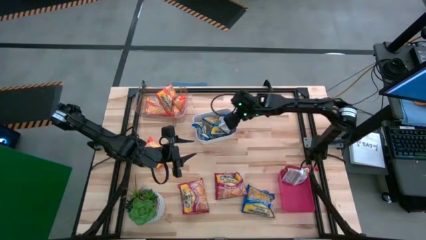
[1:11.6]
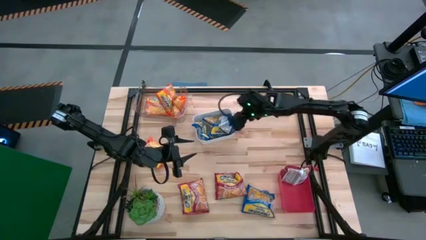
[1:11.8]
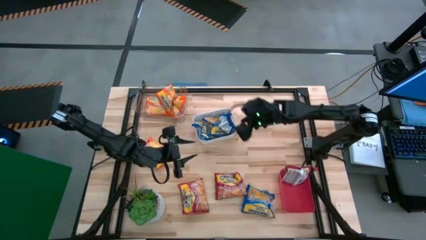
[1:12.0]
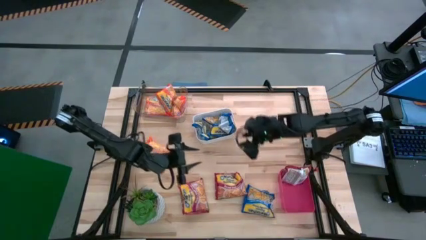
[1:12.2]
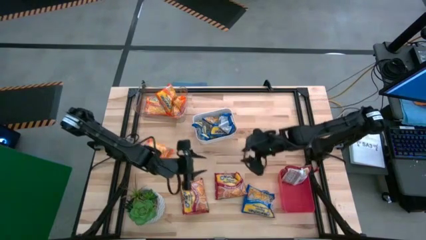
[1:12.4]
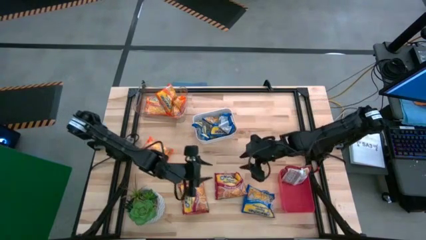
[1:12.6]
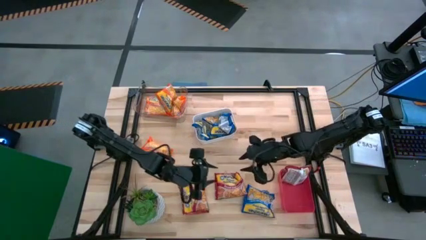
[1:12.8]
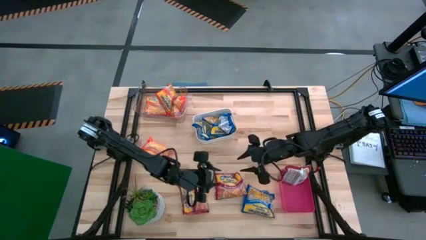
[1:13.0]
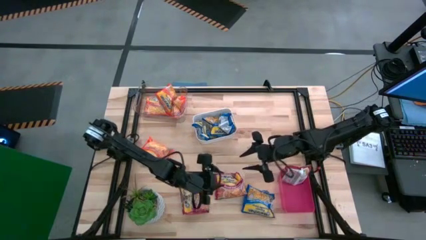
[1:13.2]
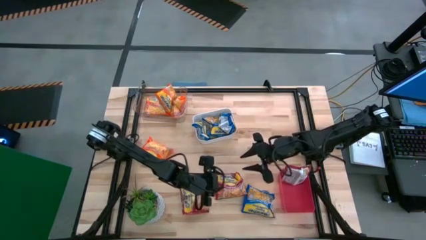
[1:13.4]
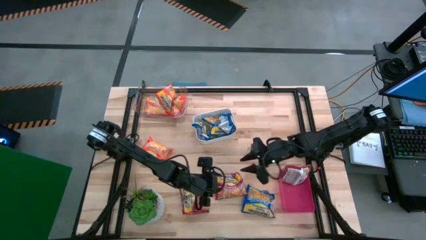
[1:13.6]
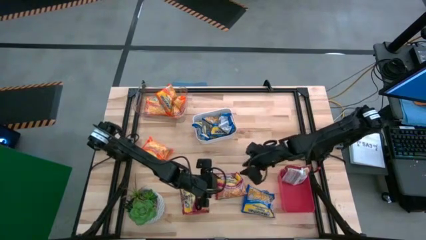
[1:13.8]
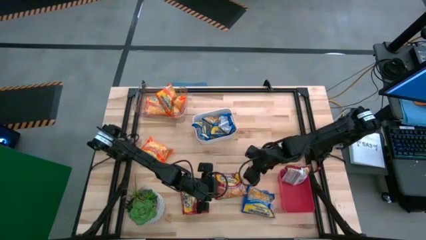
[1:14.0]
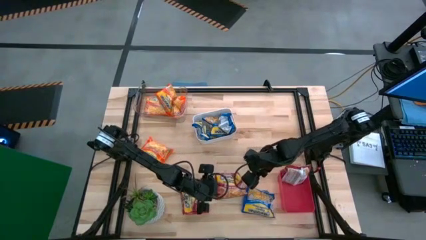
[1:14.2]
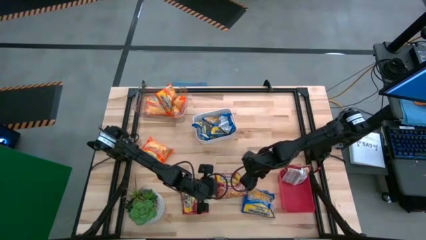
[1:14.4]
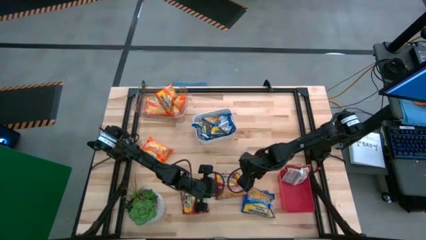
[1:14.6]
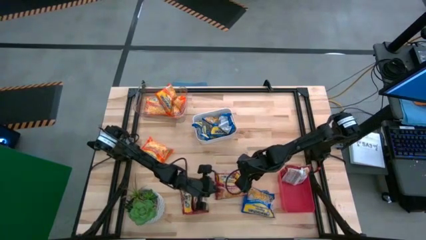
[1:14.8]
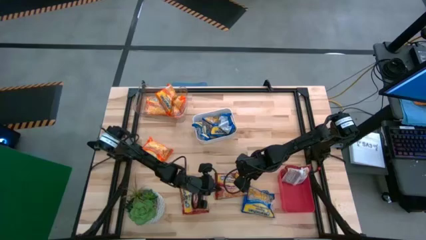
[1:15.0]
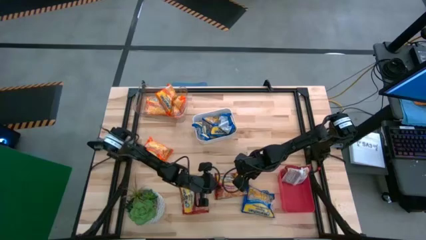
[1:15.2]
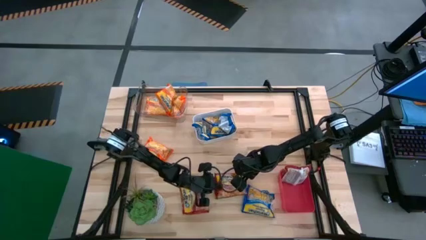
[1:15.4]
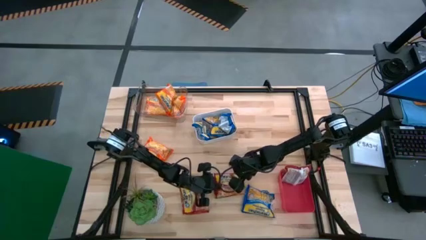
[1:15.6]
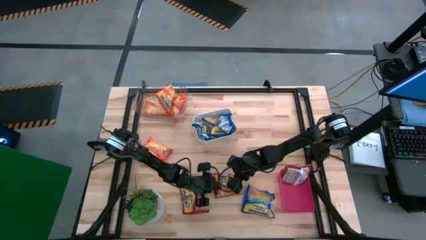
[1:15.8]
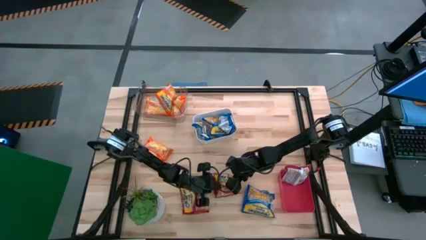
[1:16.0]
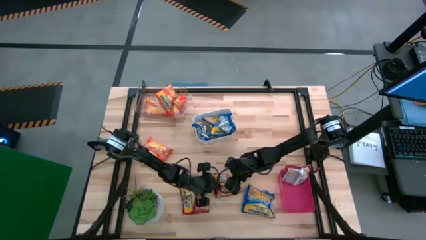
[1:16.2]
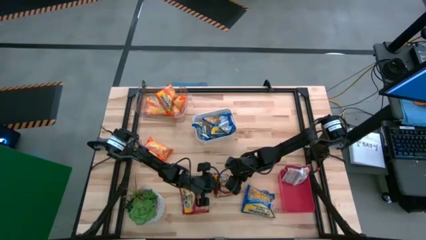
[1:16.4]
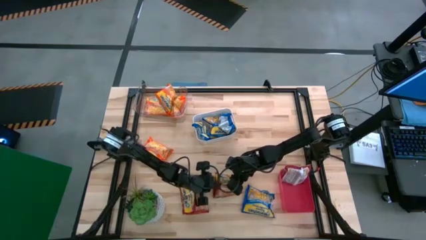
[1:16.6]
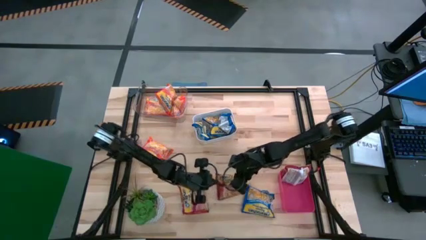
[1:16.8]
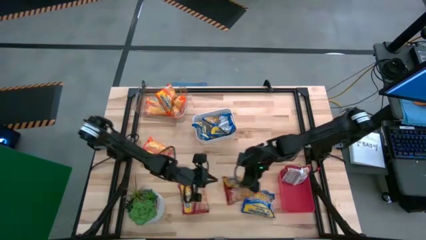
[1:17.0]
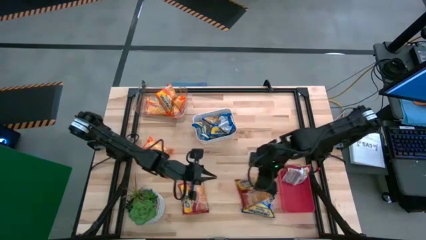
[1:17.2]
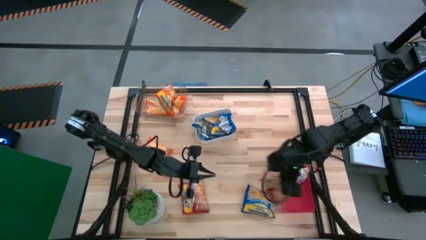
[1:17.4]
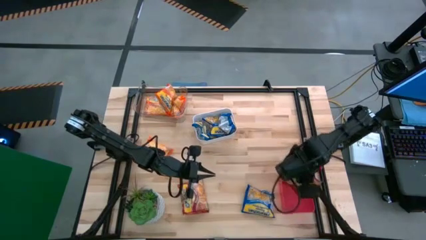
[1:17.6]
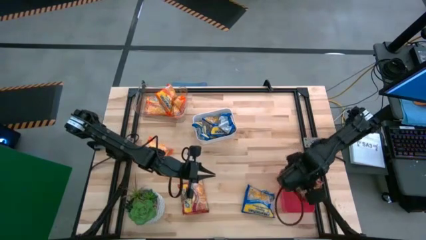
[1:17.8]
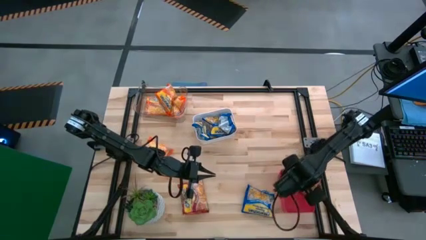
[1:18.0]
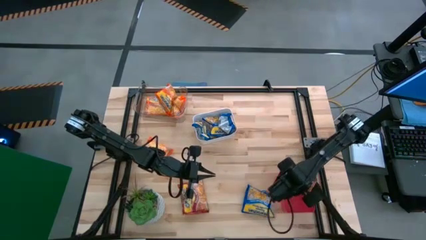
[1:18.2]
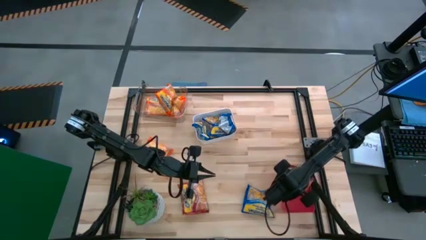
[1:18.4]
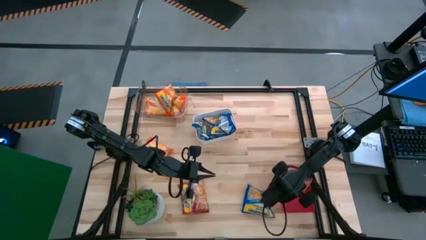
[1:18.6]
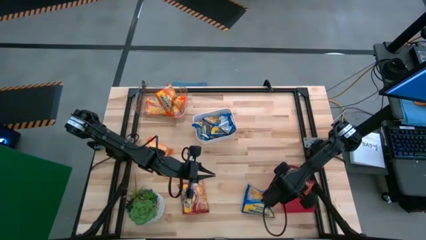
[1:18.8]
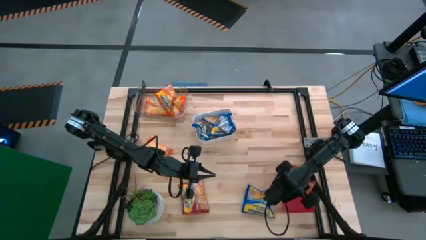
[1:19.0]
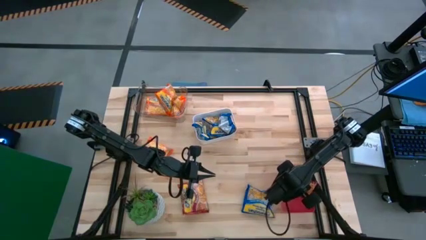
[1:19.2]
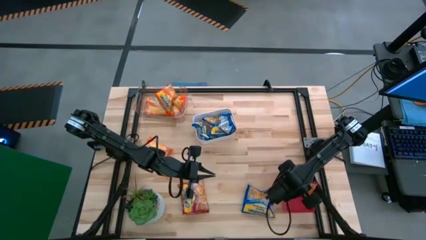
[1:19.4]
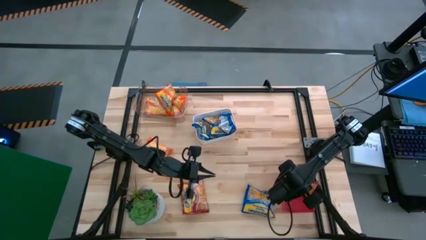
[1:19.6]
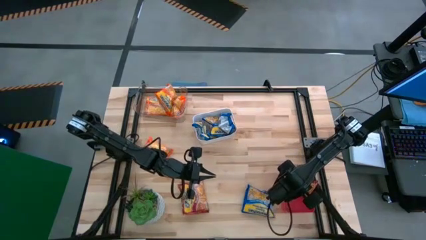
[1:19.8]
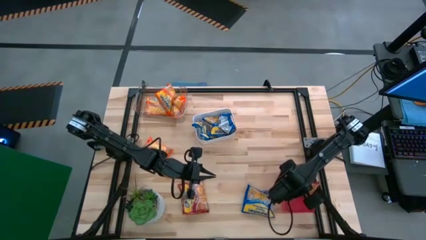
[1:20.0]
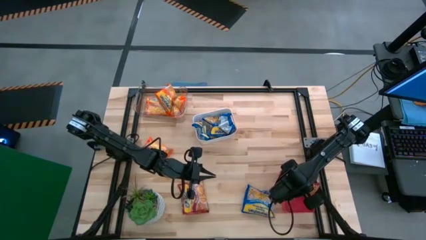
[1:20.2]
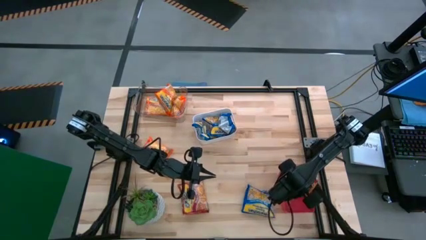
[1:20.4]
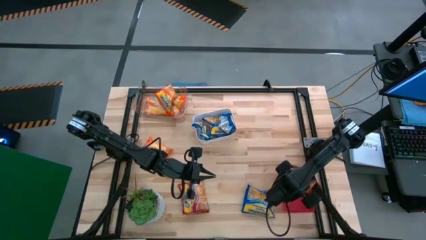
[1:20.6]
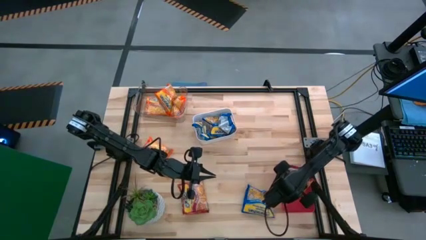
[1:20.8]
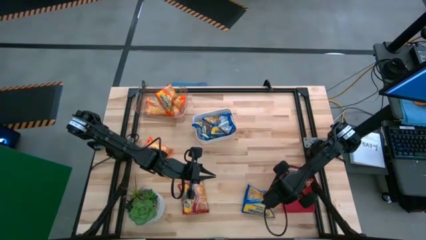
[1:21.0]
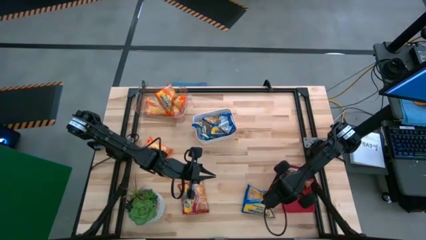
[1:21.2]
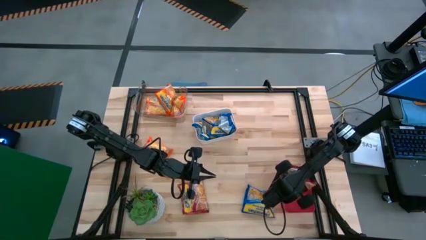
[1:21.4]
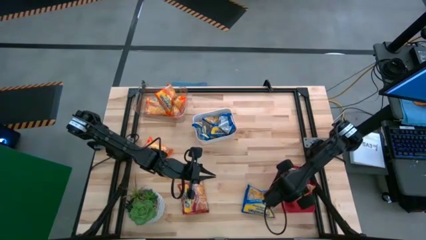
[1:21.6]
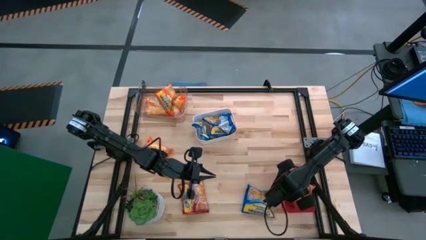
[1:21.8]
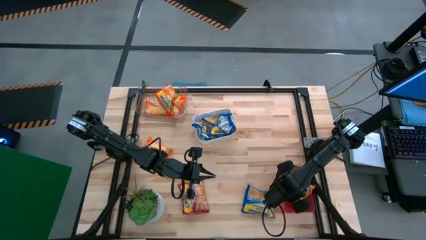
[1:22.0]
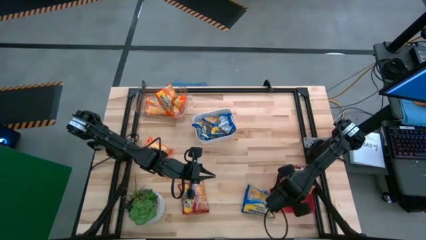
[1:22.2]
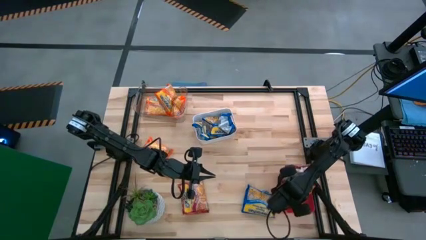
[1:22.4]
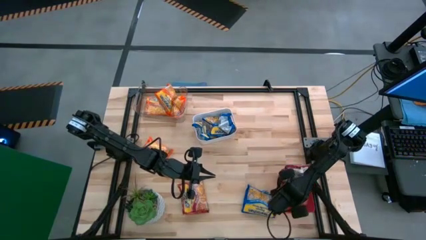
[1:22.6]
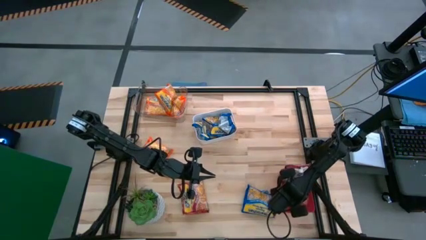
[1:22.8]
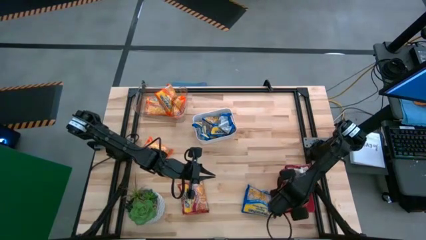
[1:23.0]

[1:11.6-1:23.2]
Task: Sort Maruchan noodles
Put the red noodle pack into the pink bin

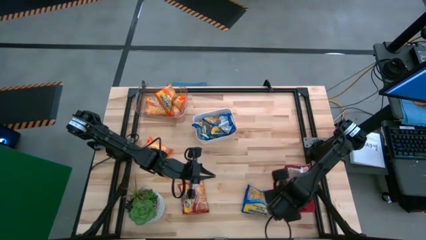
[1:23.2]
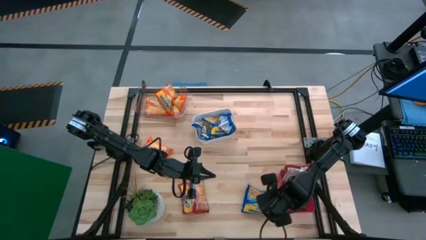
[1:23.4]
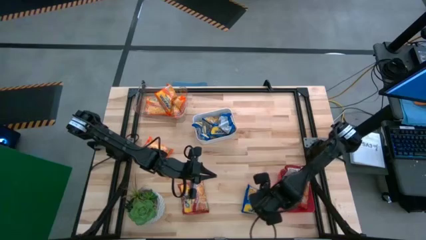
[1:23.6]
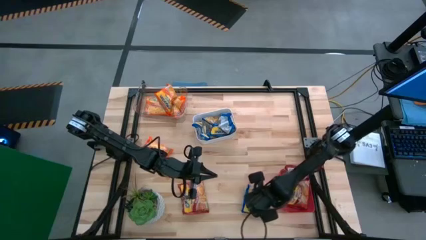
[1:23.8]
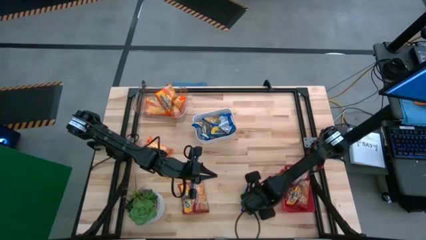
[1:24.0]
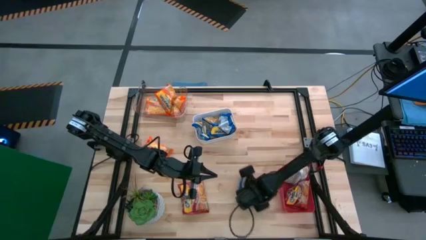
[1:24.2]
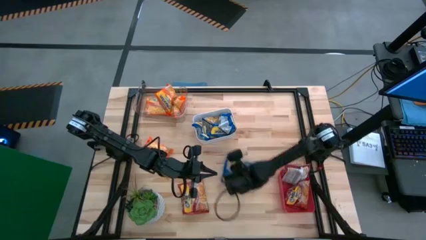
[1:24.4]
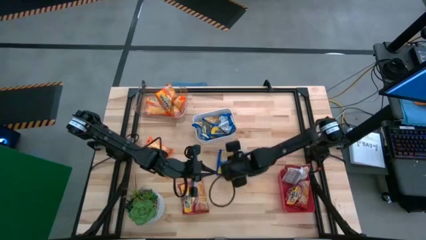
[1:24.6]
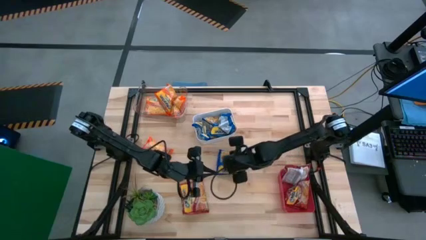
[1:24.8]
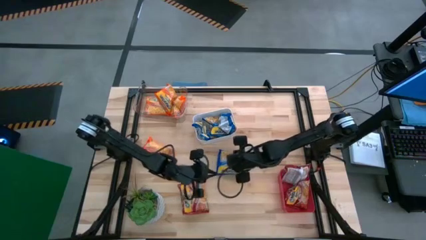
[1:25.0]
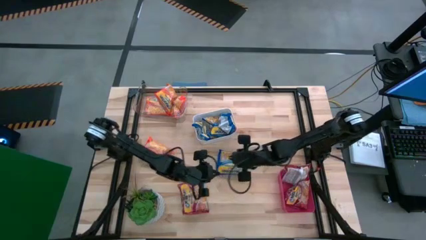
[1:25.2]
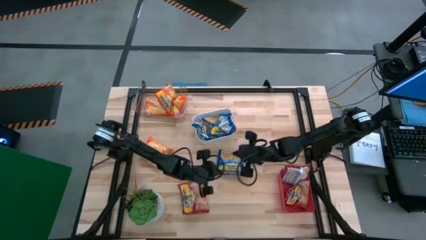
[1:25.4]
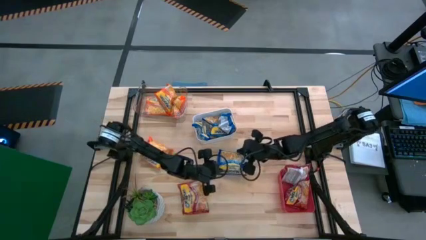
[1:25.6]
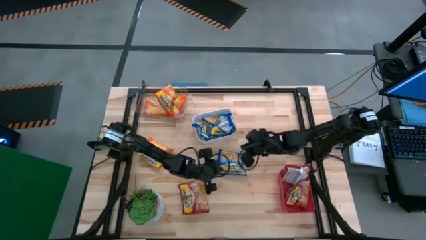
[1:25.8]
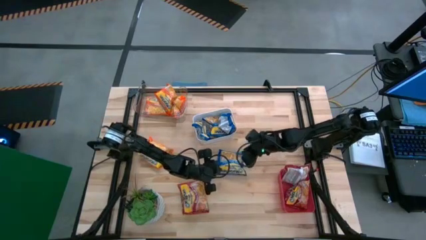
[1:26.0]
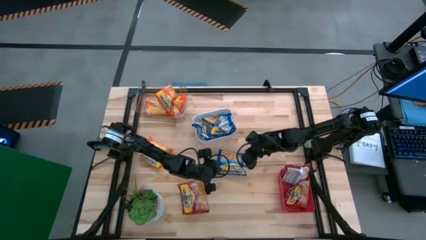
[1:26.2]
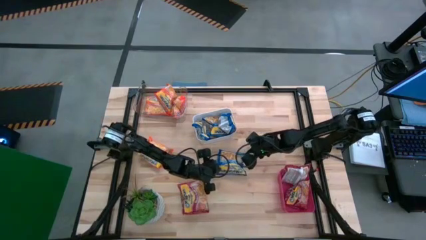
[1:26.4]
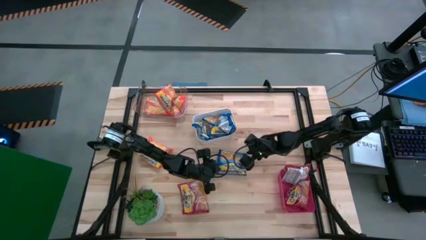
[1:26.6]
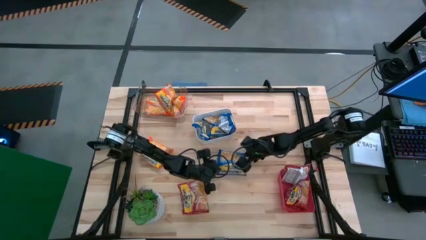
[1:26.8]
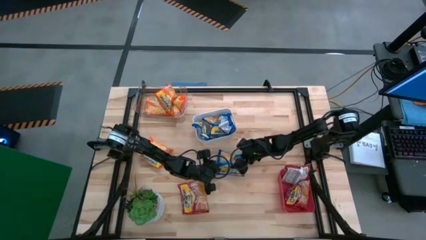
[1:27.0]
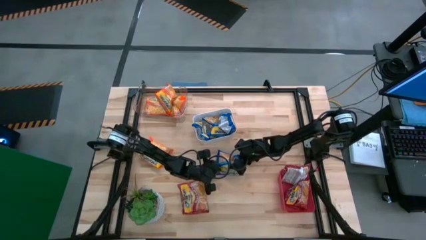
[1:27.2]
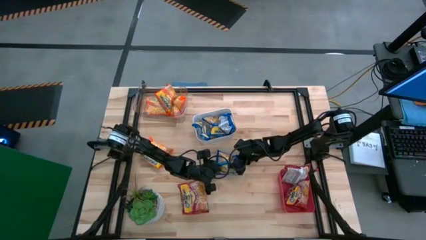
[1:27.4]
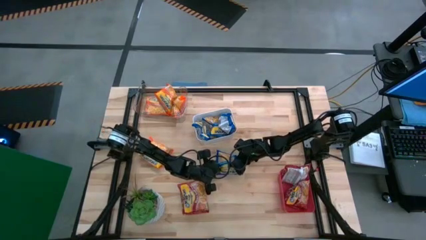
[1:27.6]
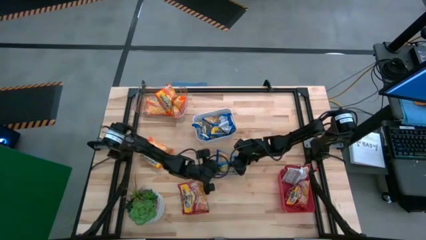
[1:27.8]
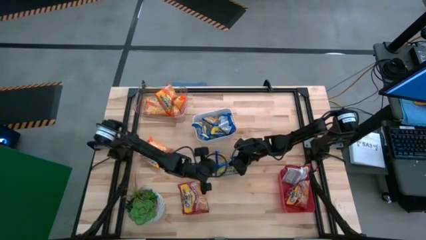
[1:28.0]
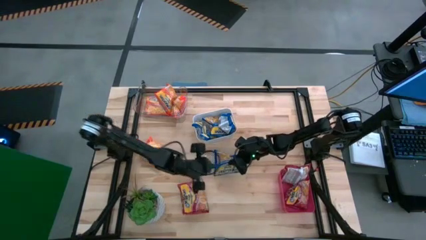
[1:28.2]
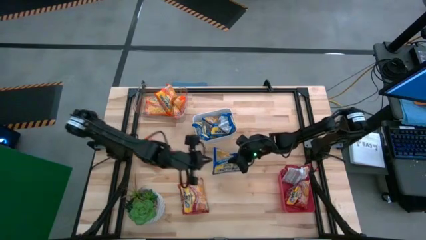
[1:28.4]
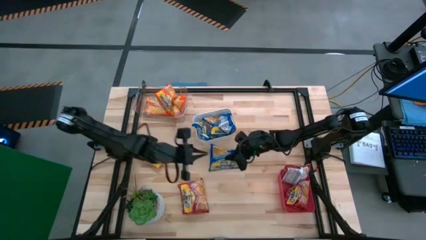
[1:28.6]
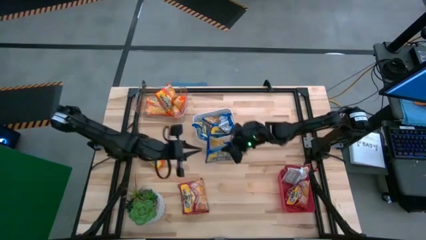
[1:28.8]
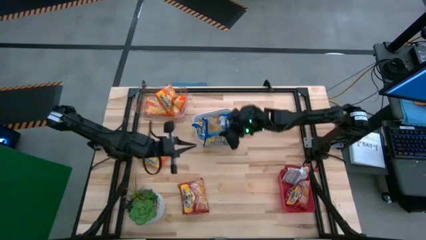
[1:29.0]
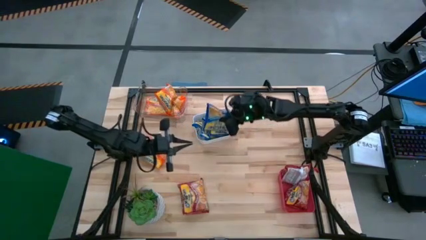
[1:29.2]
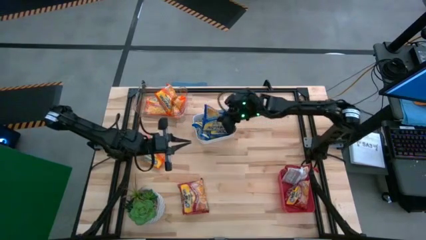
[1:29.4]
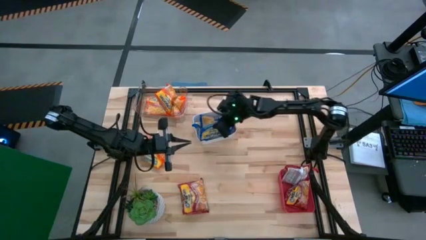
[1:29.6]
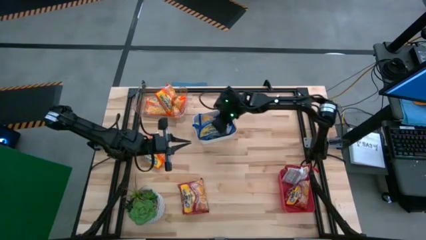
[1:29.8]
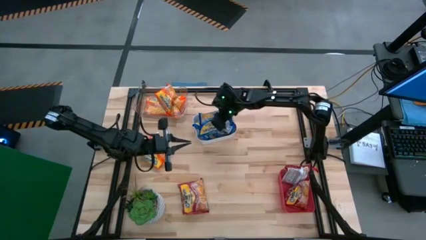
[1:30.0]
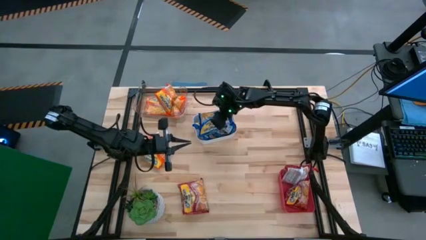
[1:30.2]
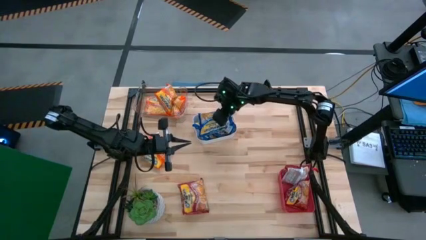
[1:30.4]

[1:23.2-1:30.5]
Put the blue noodle pack into the white bin
